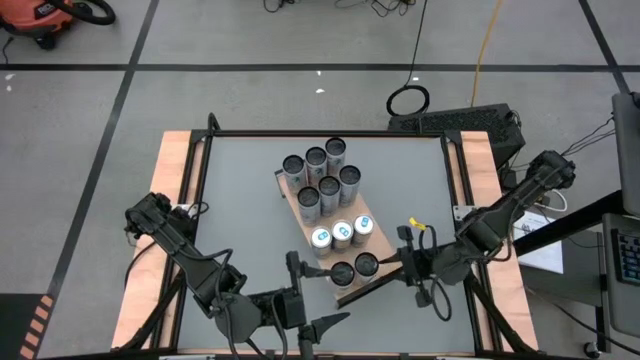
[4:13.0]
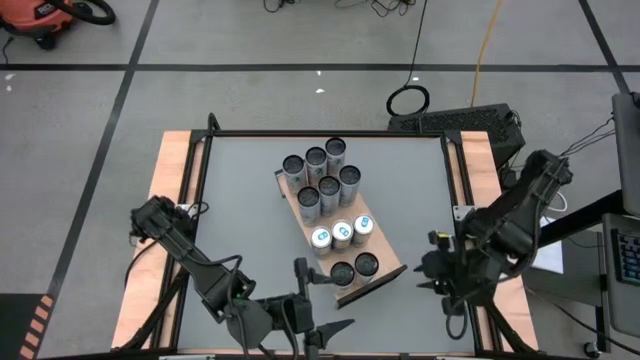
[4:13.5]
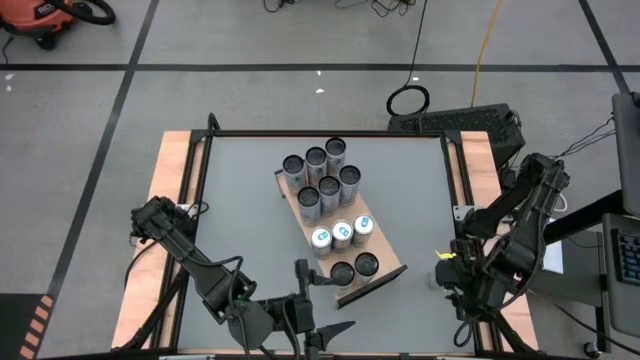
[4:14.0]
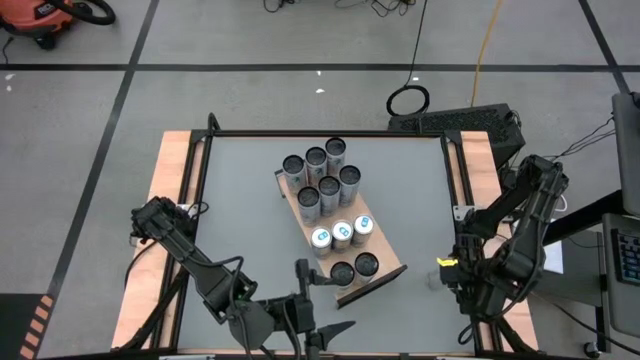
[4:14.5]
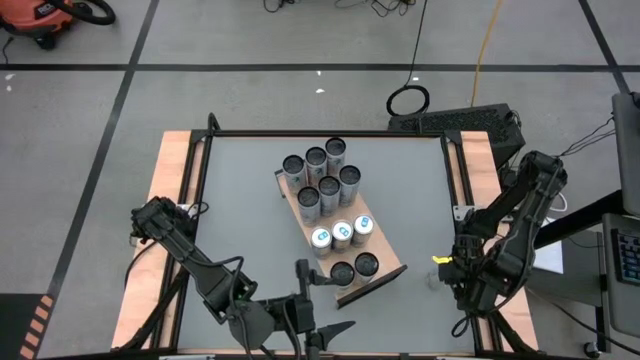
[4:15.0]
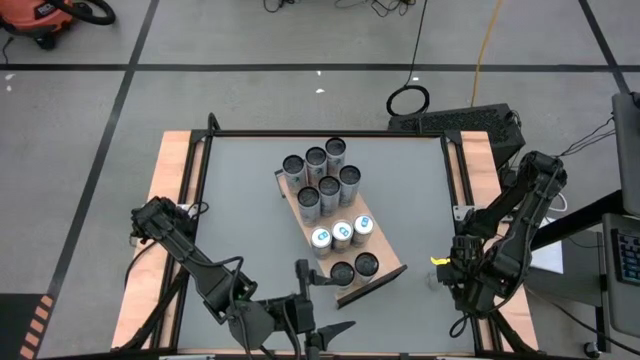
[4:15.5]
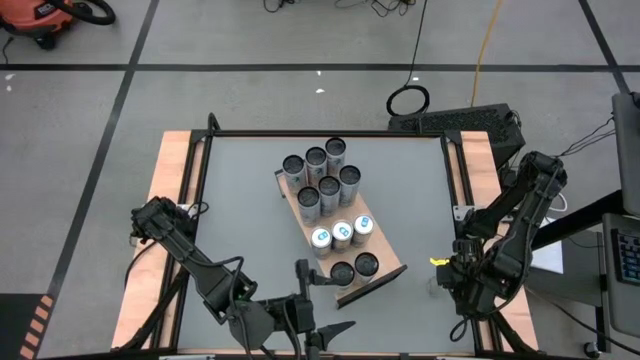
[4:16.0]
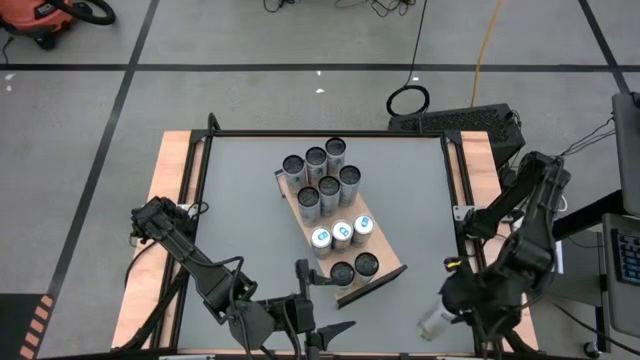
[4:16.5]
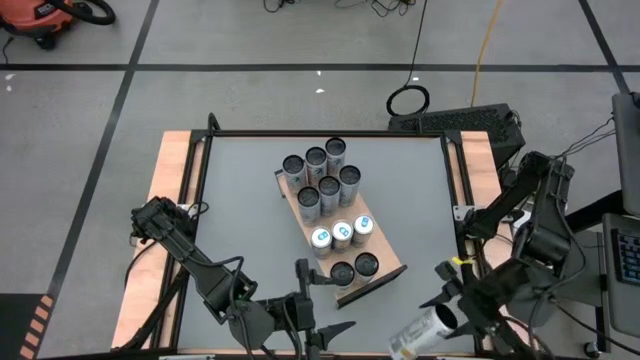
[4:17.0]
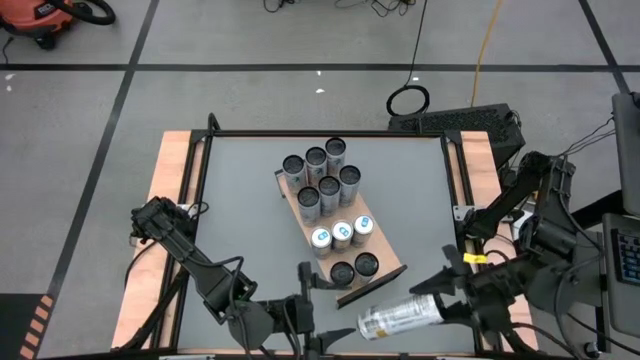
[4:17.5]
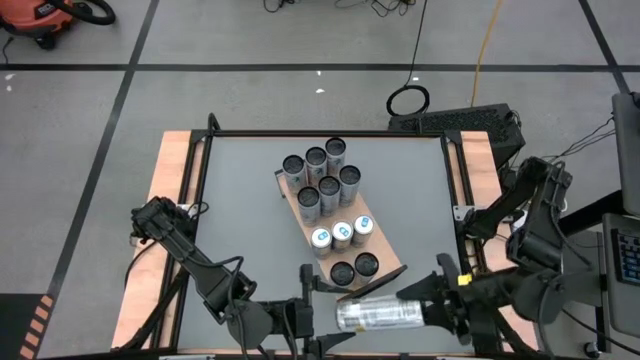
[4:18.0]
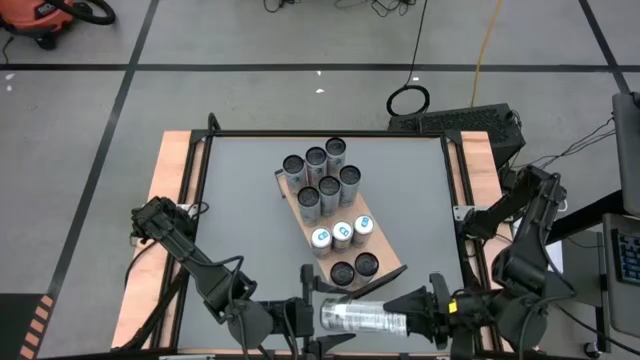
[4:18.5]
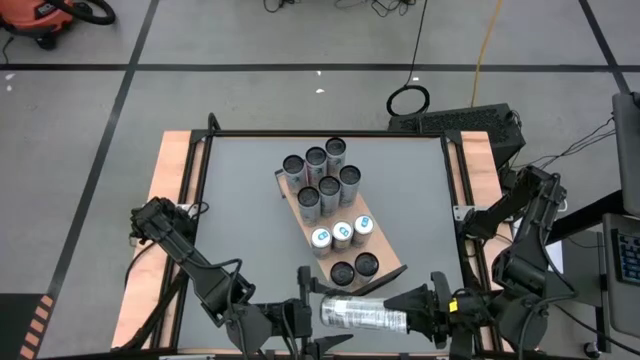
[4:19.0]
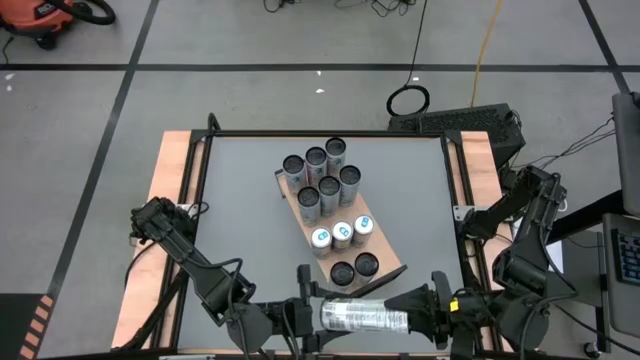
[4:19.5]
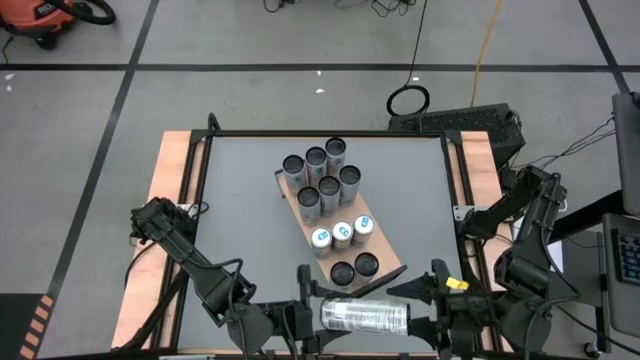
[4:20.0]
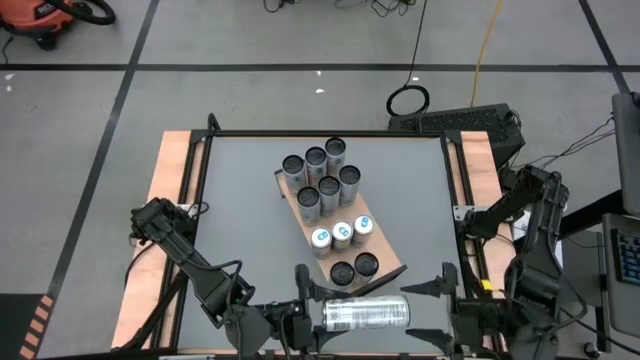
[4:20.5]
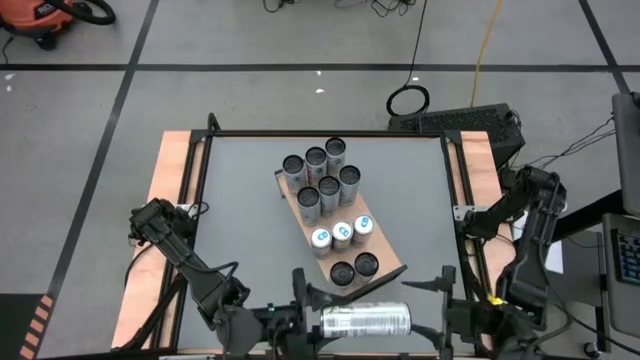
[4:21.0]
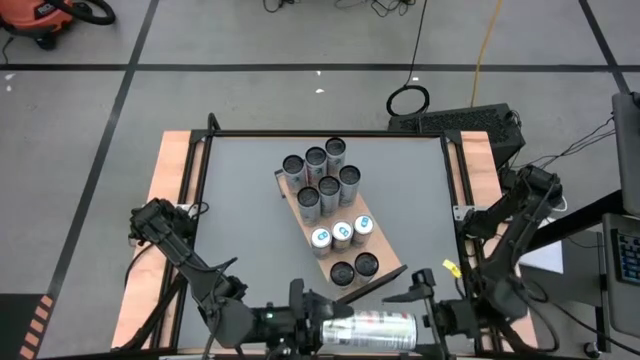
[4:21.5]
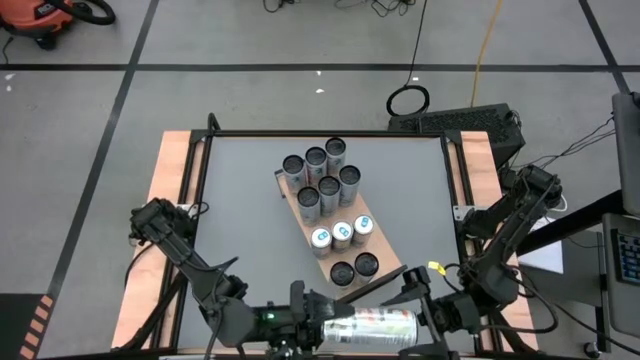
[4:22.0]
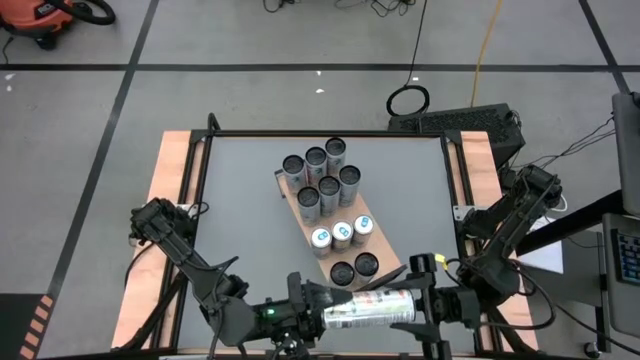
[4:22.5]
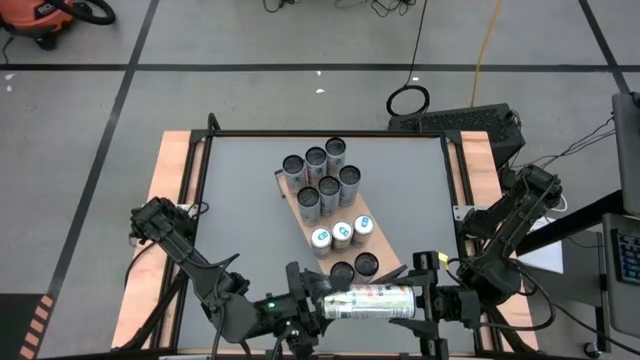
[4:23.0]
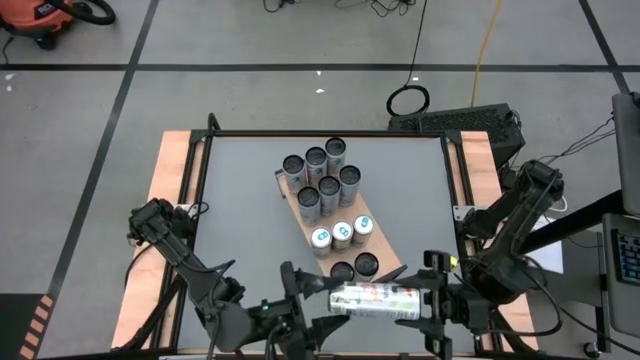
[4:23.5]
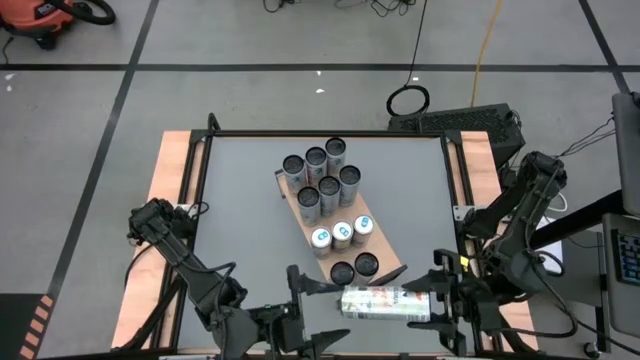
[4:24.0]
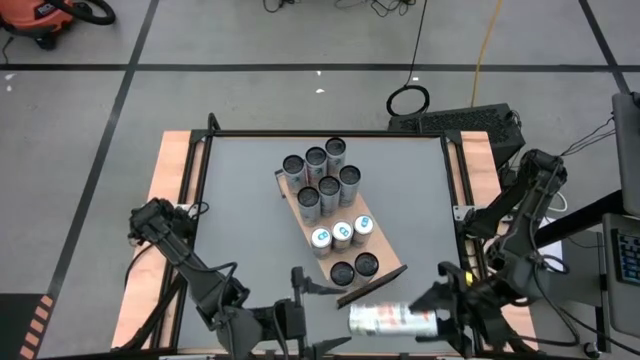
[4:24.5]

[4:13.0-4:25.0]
Task: Place canned beverage on shelf
Put the white-yellow soda can on the shelf aligned with the other white-yellow soda cans

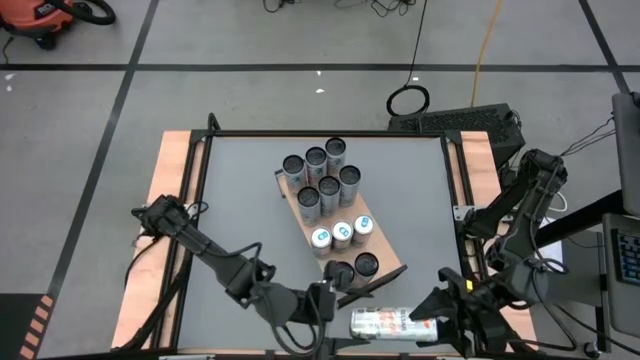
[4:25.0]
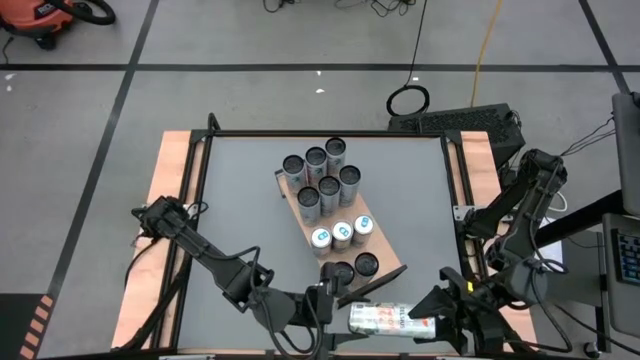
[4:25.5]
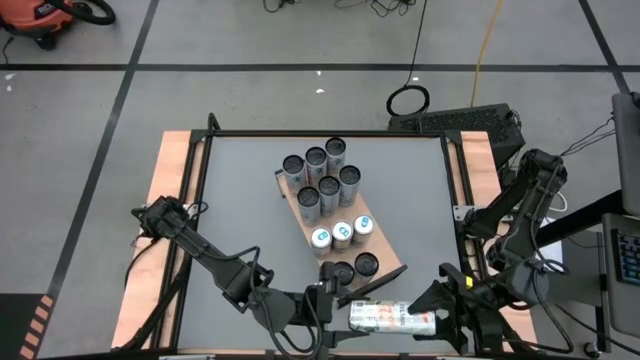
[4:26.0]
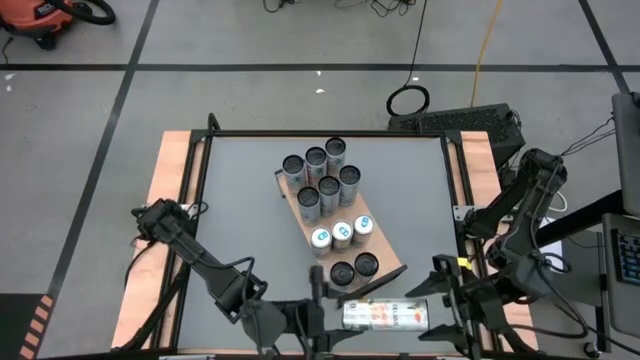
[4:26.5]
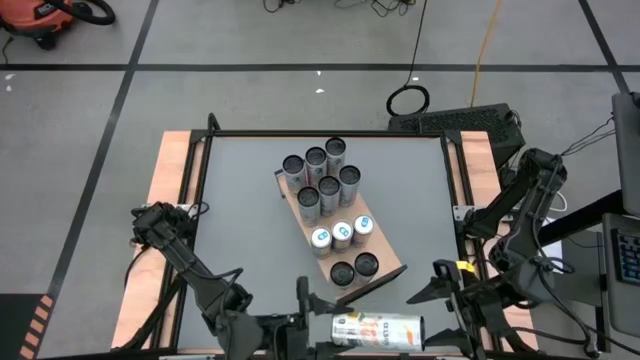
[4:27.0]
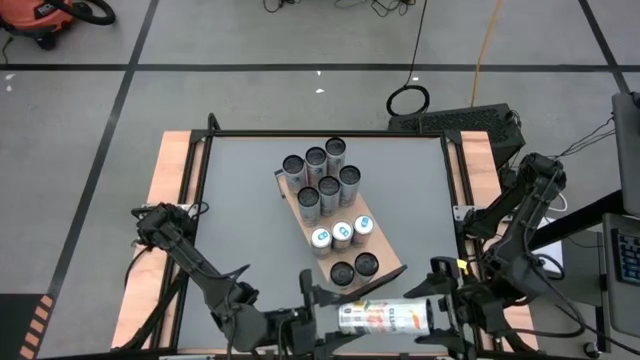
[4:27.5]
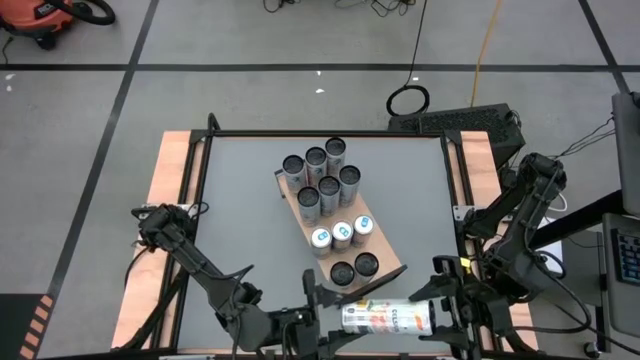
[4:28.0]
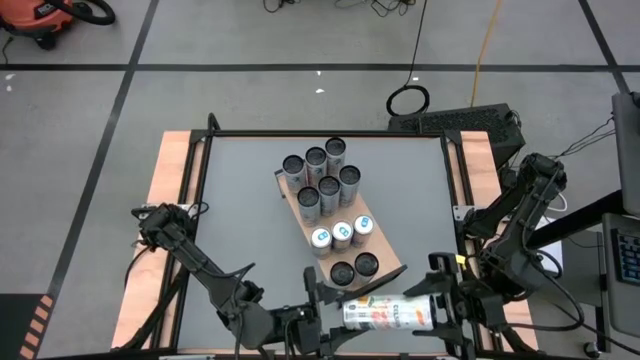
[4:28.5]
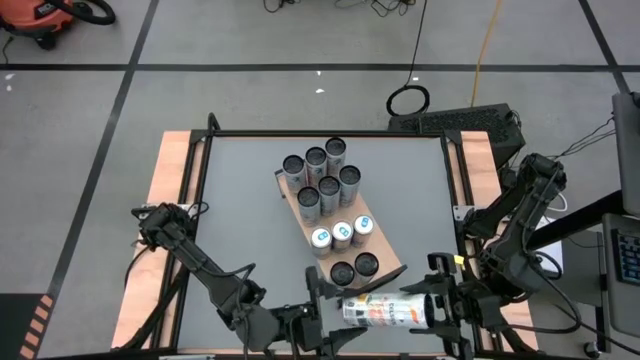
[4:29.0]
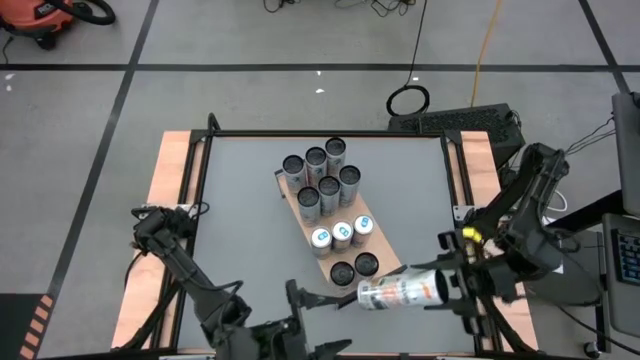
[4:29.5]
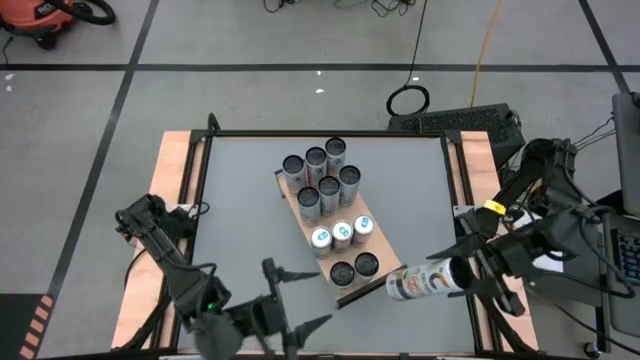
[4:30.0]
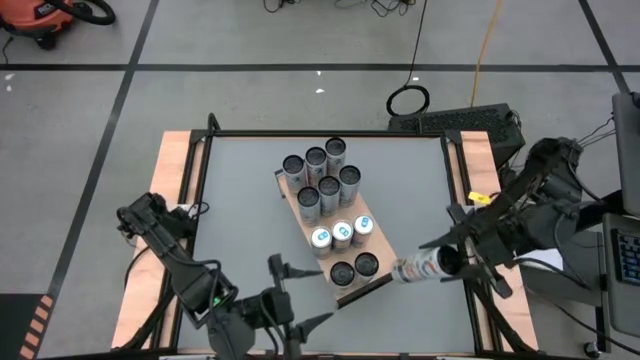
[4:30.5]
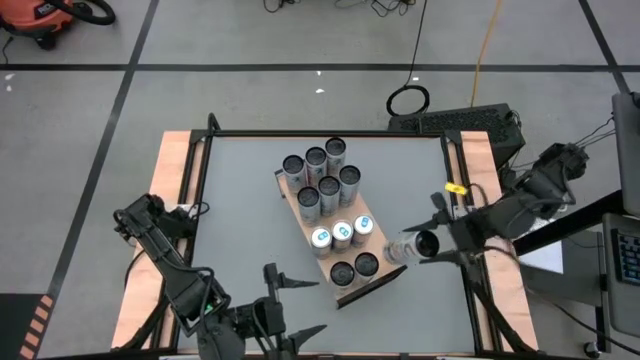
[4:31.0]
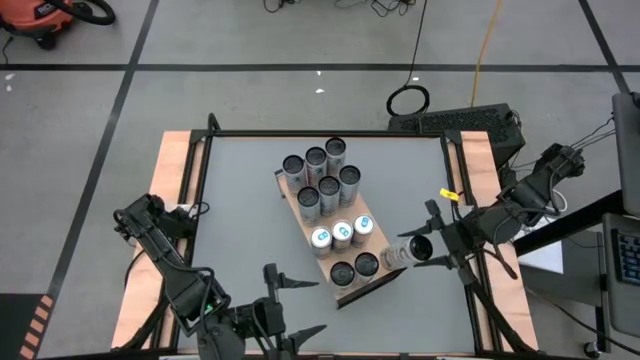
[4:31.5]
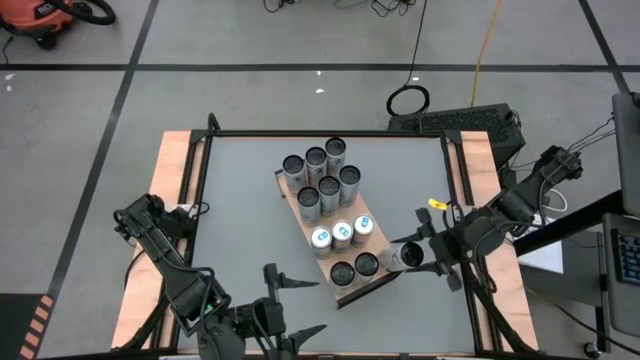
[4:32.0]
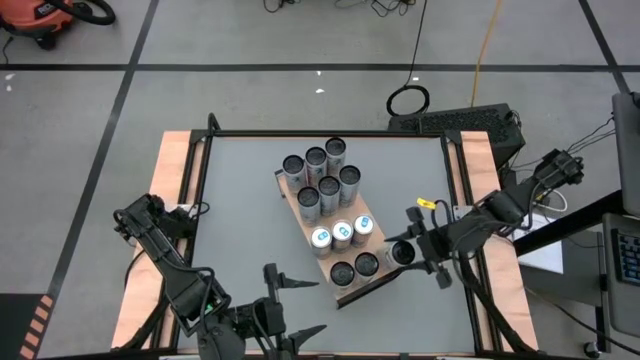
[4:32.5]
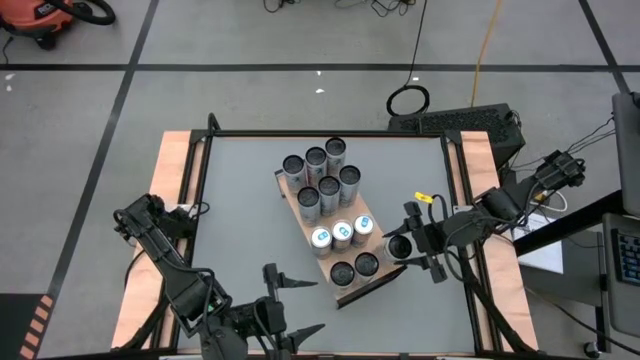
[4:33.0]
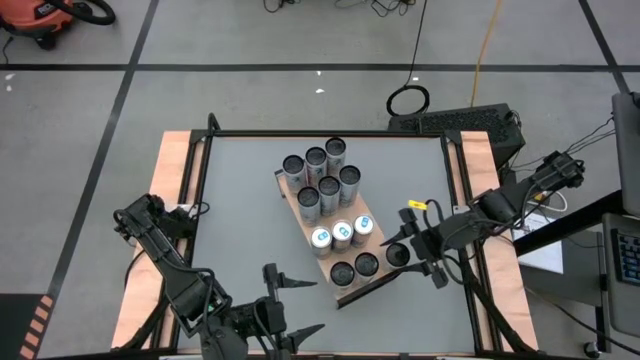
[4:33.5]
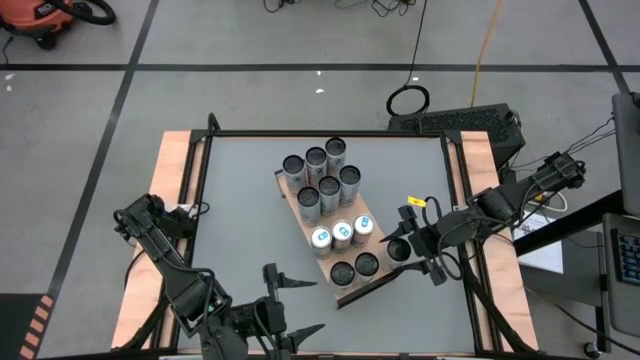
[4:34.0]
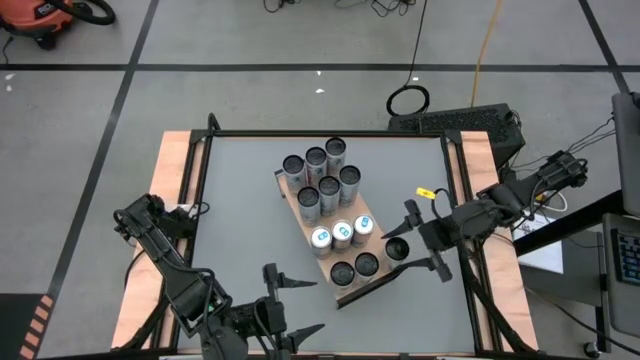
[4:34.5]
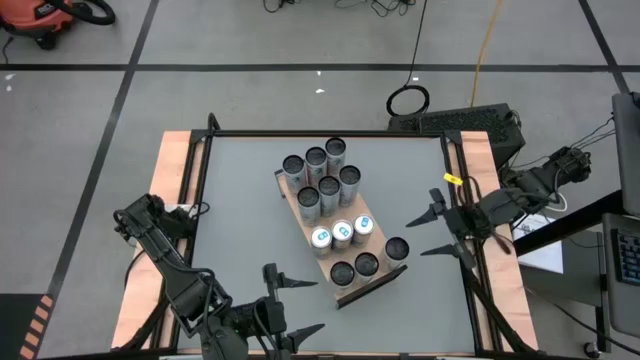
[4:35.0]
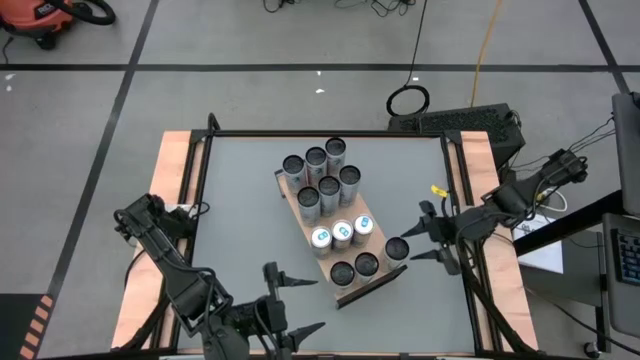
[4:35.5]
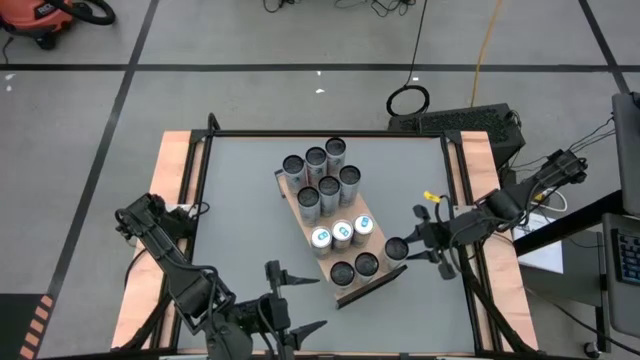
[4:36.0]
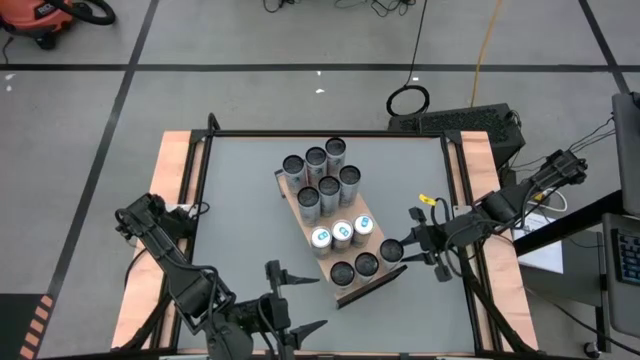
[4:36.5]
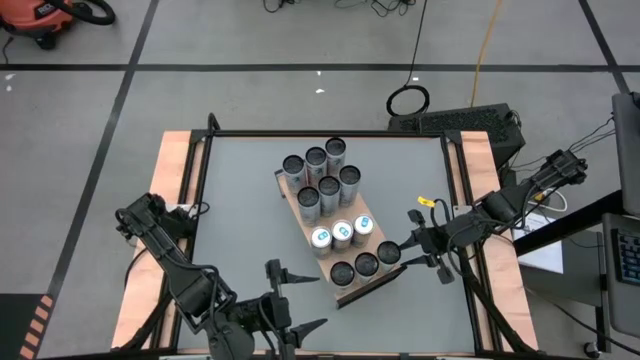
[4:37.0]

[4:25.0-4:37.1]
Put the white-yellow soda can on the shelf aligned with the other white-yellow soda cans
